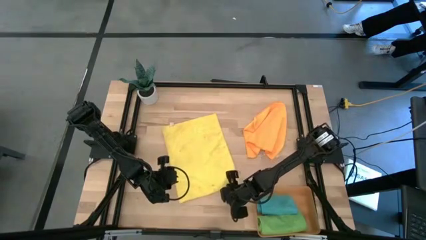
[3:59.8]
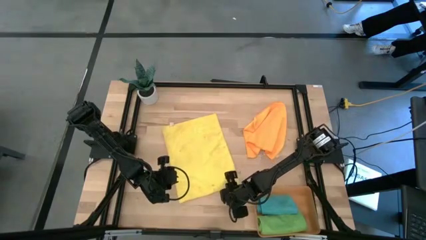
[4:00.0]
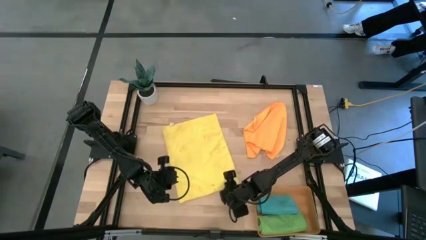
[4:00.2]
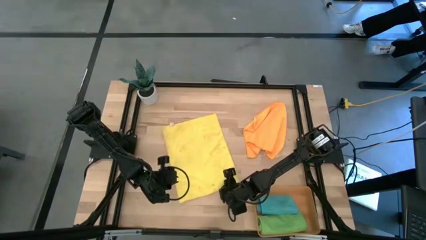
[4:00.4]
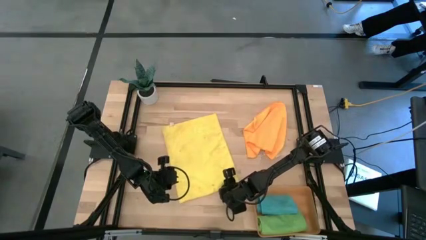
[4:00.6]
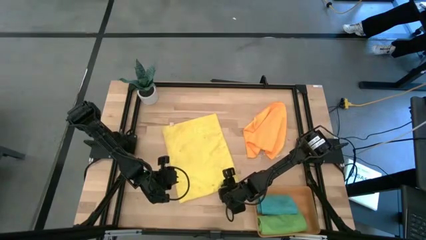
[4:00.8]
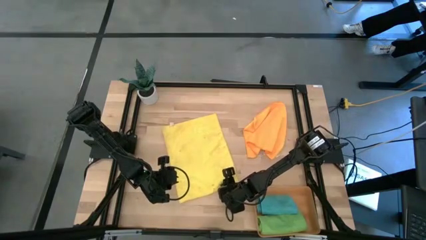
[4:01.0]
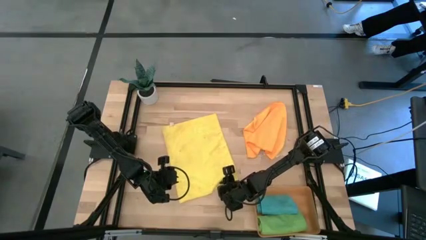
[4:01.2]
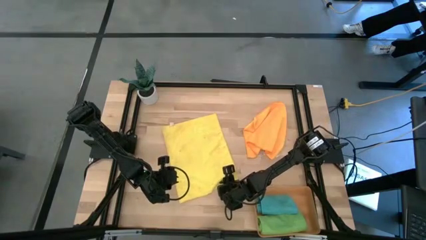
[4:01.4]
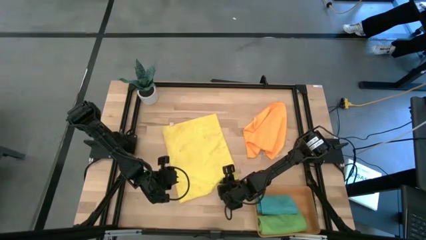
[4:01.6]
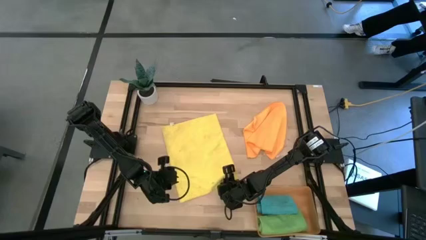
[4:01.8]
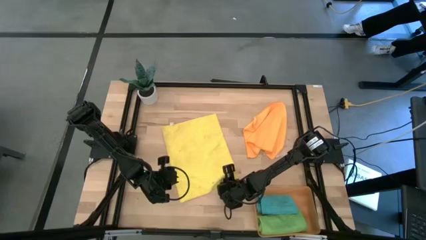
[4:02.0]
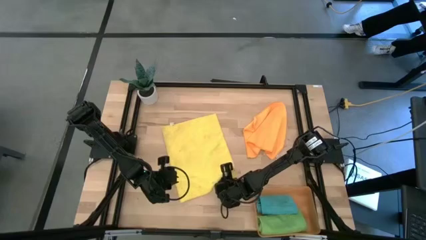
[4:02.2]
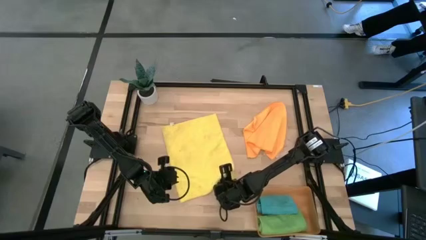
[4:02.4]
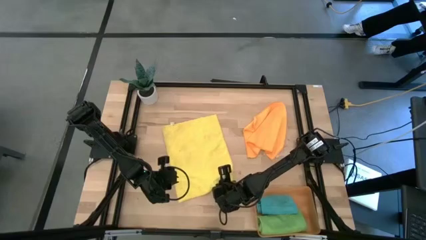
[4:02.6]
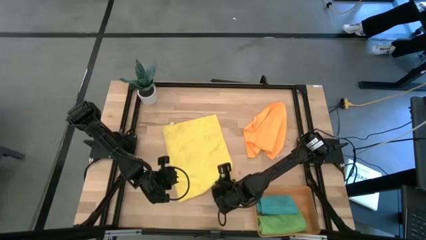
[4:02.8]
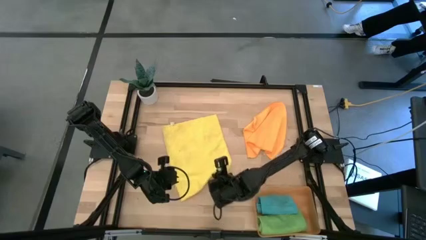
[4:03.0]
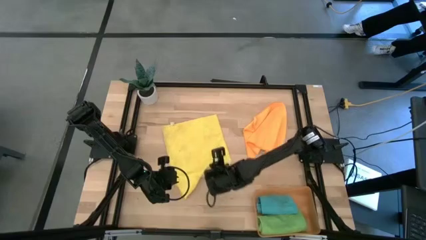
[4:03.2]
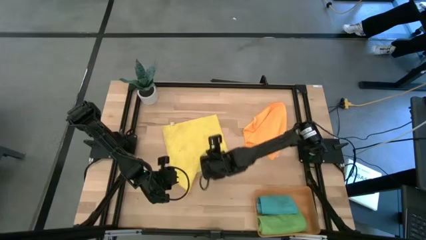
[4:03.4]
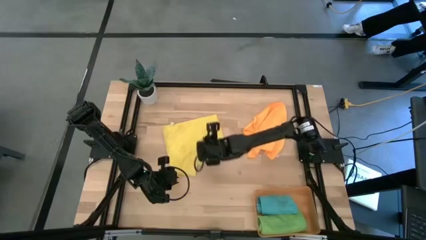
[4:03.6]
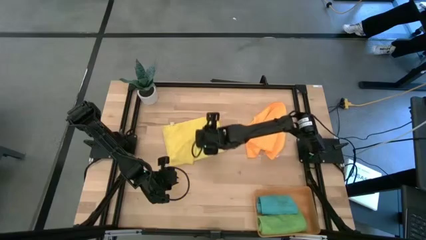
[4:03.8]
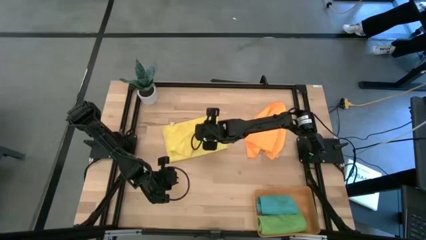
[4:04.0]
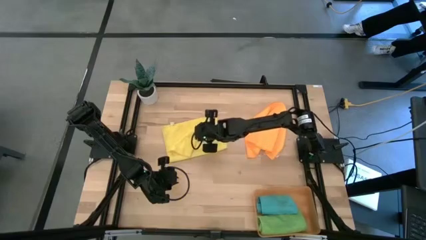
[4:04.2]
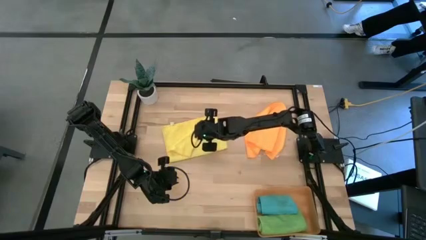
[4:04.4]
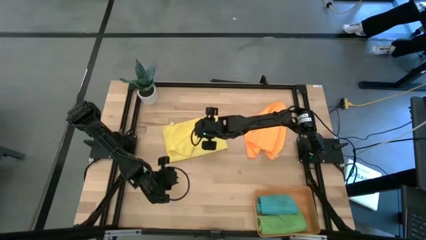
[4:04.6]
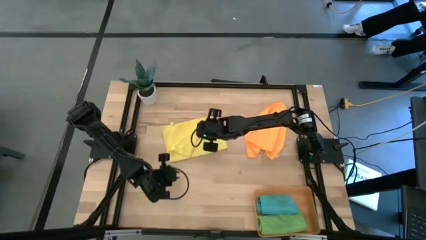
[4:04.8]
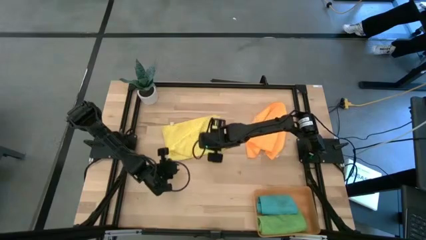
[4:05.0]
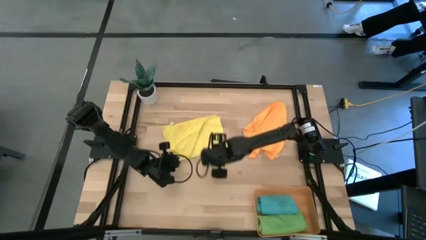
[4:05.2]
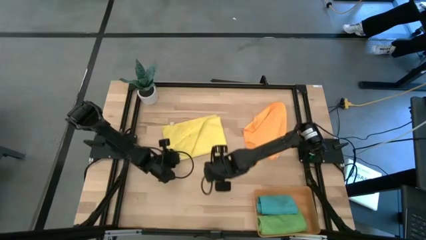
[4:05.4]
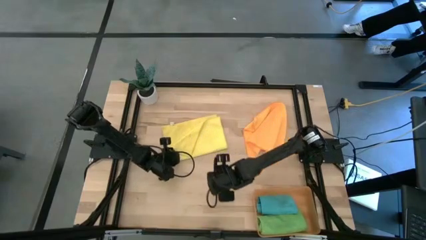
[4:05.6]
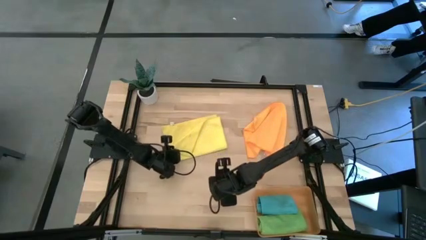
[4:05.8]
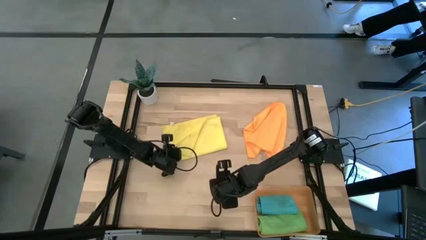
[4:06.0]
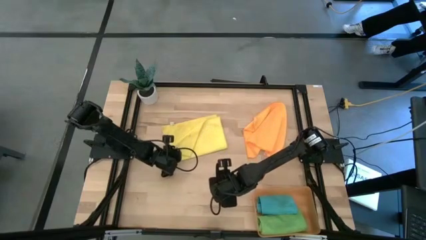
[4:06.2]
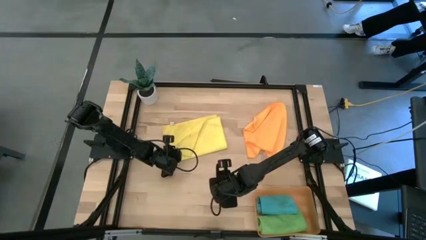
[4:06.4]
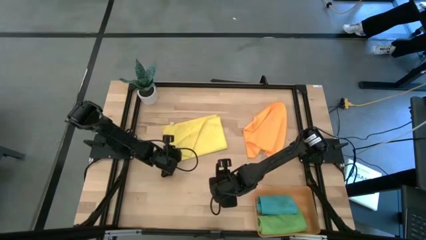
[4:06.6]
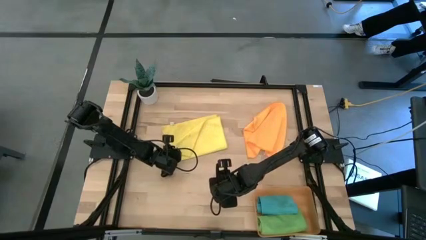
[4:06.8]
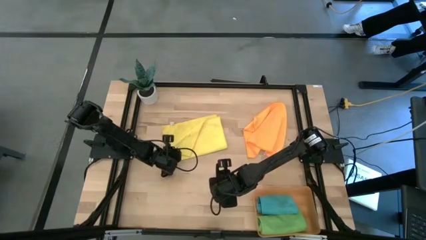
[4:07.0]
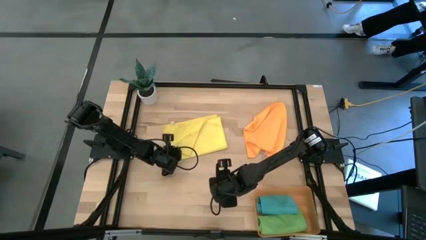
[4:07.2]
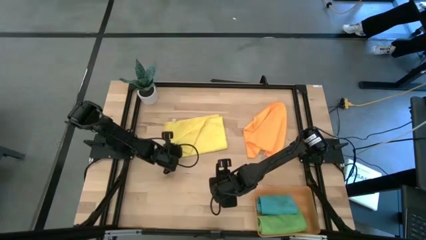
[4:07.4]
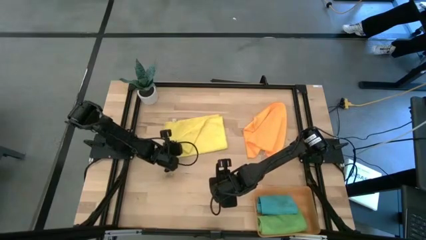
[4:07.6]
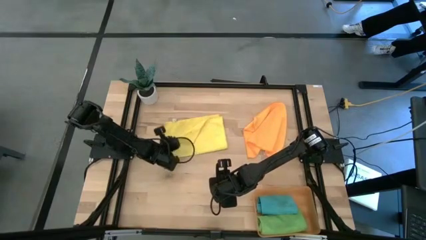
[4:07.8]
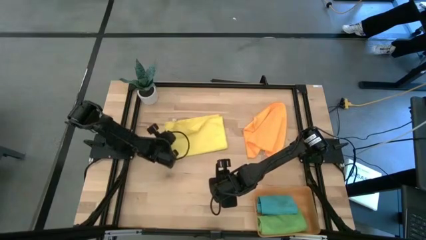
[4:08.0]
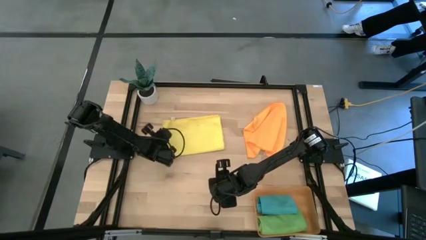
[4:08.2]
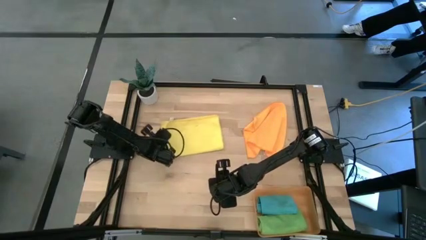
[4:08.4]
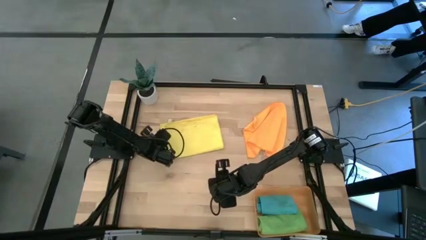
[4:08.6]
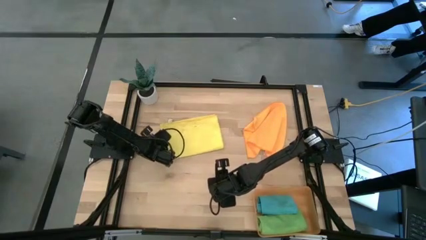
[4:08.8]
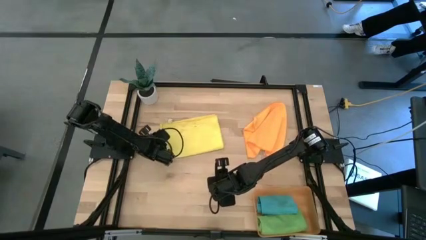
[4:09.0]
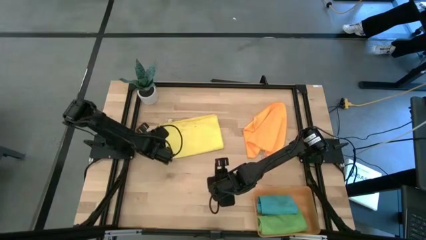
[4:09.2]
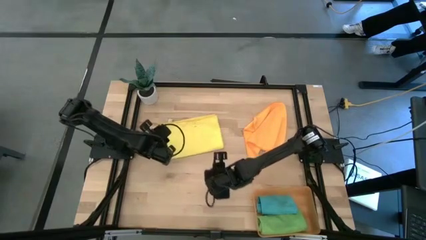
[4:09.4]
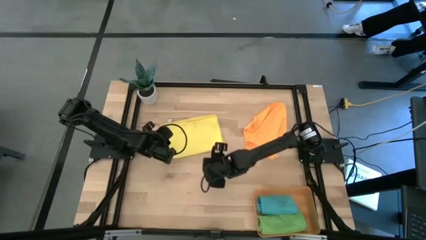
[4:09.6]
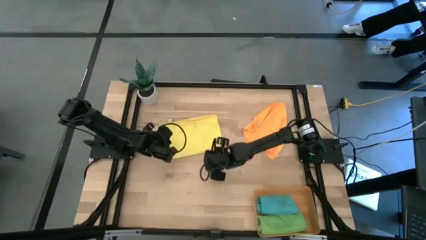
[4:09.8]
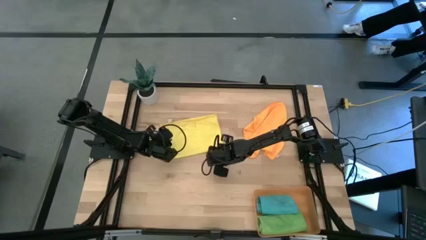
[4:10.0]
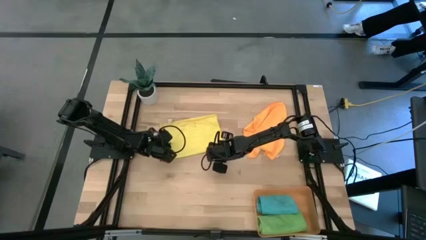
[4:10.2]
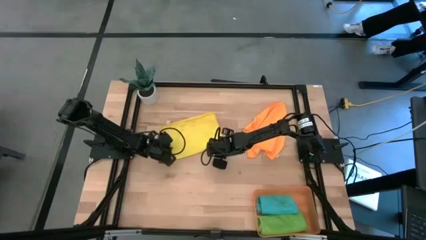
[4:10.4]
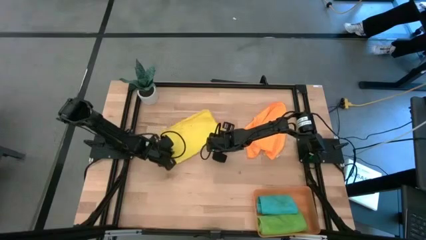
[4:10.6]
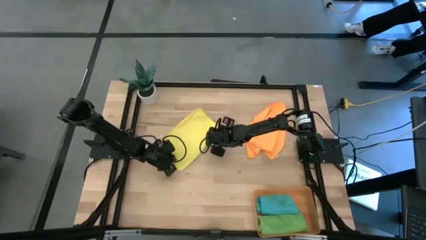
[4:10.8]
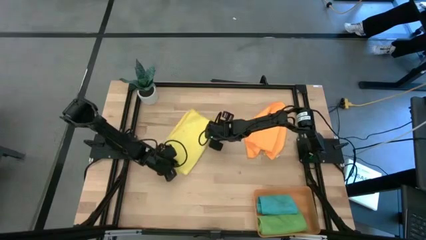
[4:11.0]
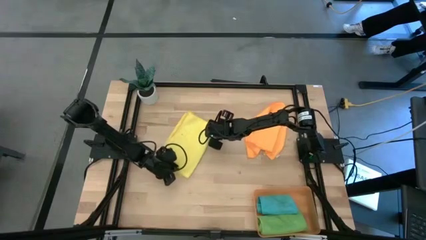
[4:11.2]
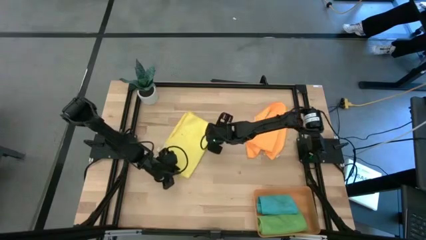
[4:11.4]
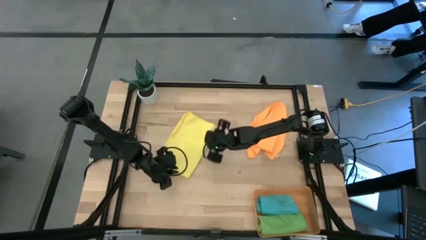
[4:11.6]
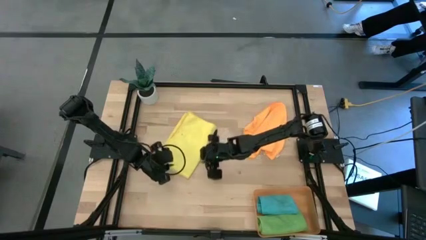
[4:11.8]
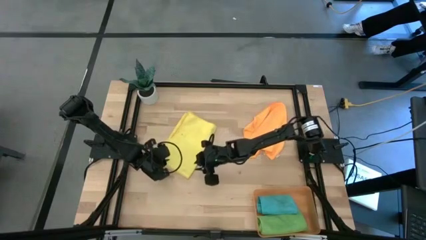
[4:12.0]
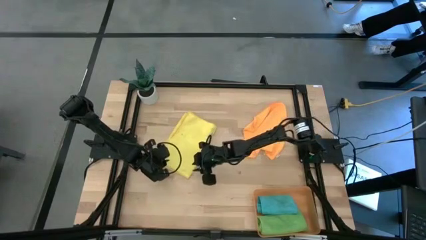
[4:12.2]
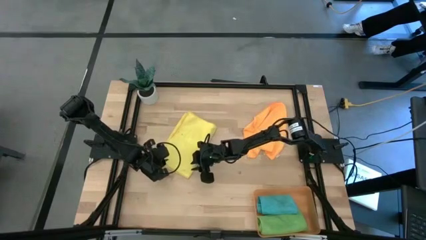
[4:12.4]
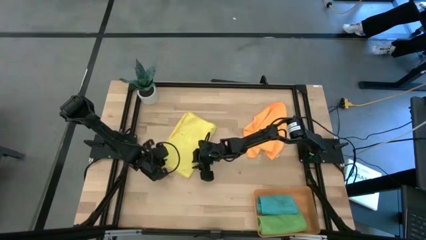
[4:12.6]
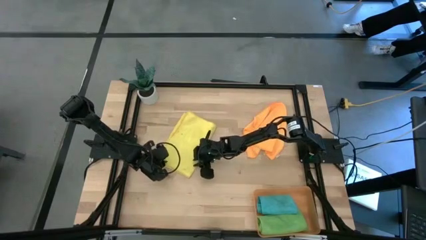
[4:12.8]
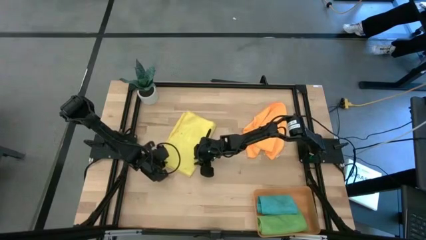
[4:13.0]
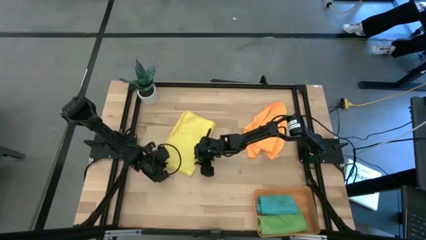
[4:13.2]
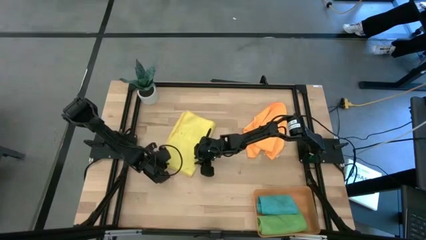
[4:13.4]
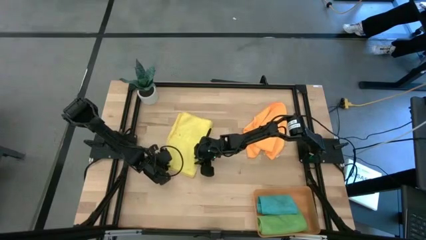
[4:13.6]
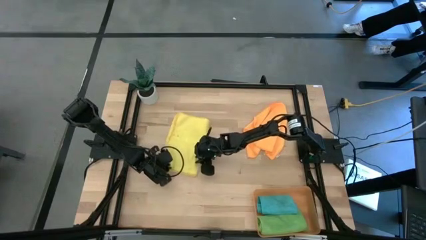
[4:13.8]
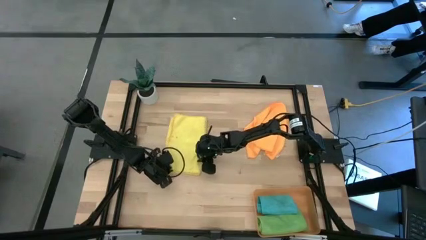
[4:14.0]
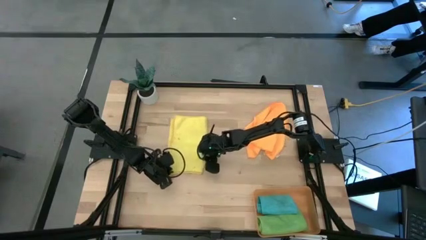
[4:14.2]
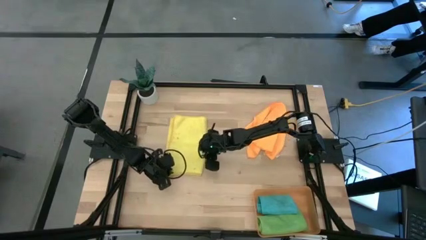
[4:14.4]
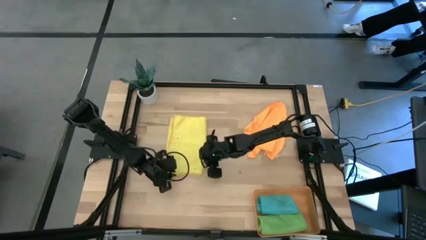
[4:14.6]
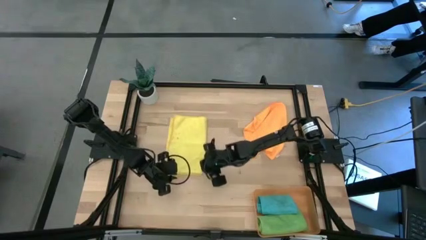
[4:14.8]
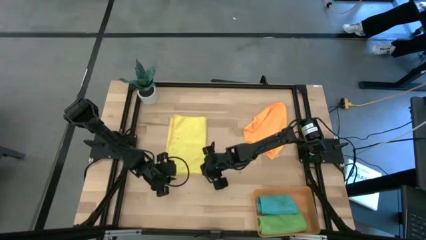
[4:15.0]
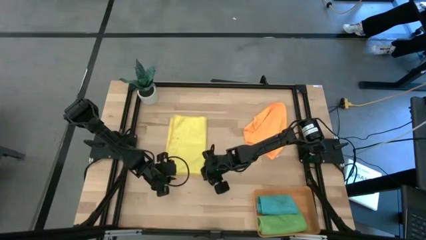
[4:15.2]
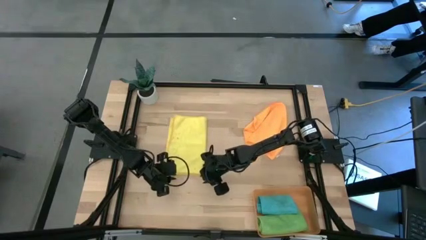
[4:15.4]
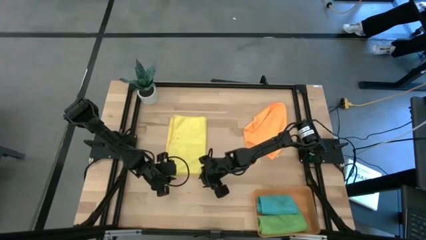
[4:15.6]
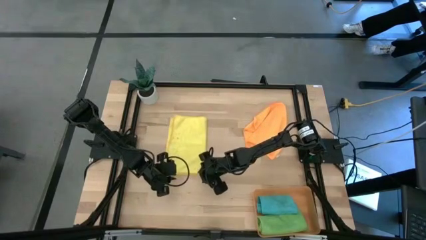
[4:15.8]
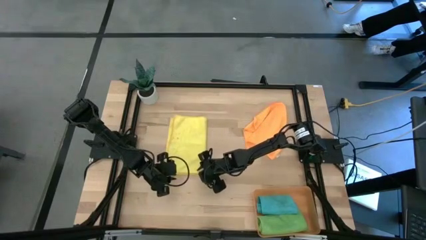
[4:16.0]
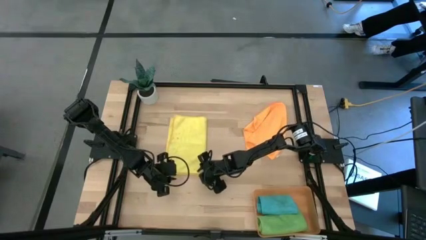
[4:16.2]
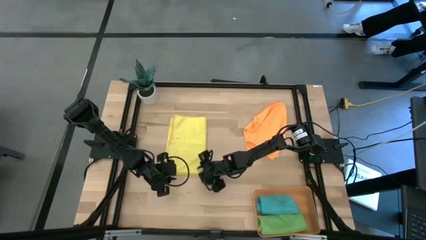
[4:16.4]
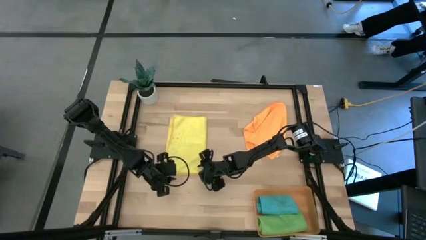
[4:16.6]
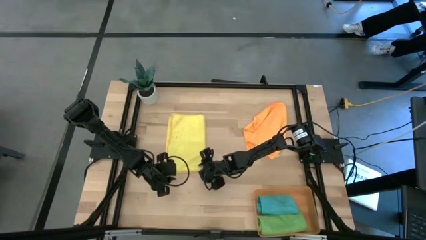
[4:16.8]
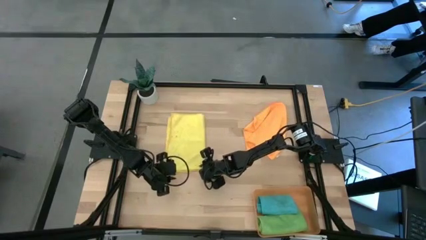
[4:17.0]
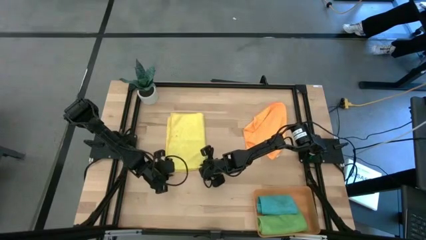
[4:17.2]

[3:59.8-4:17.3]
Task: Roll microfiber towels into tight, uniform cylinder then place into a basket
Roll the yellow microfiber towel
